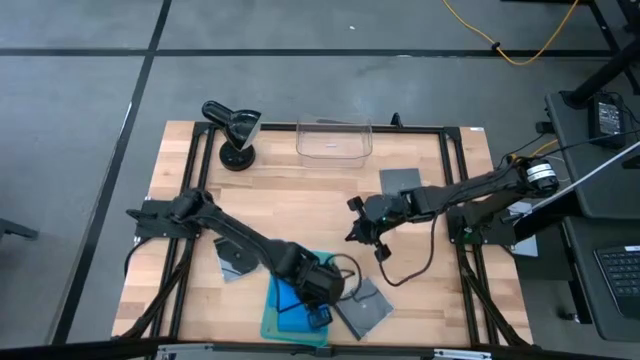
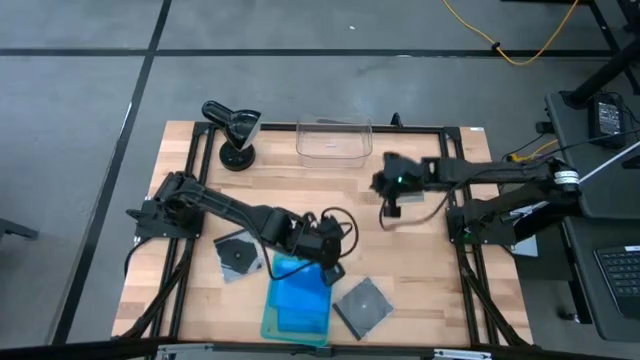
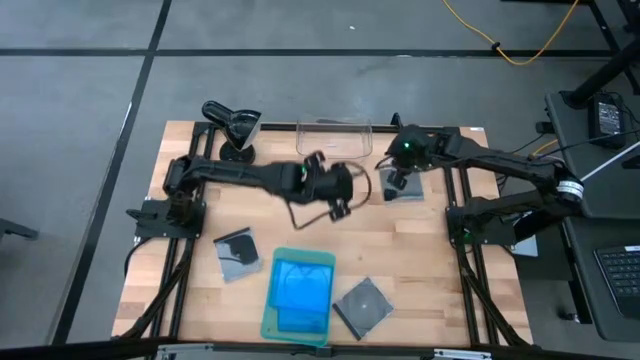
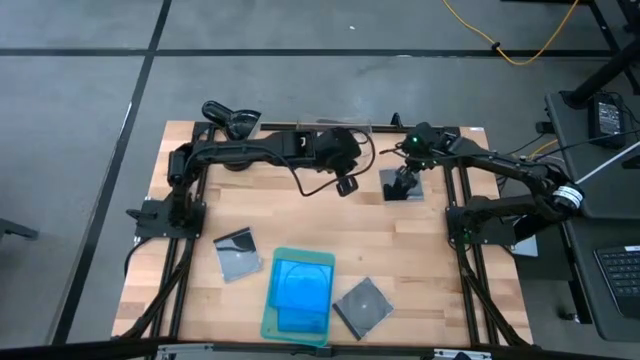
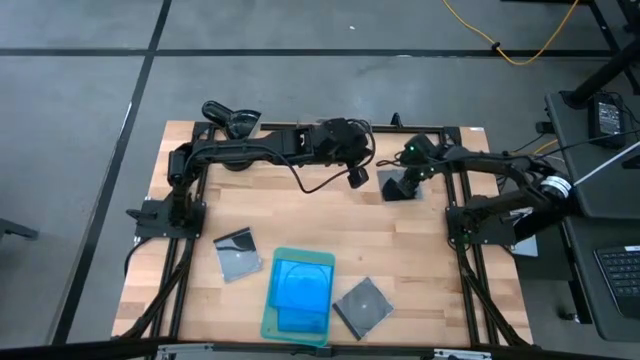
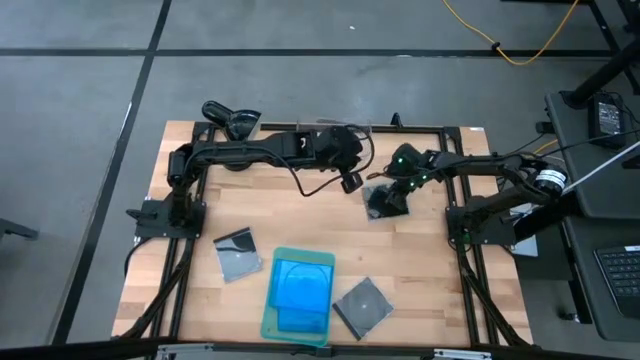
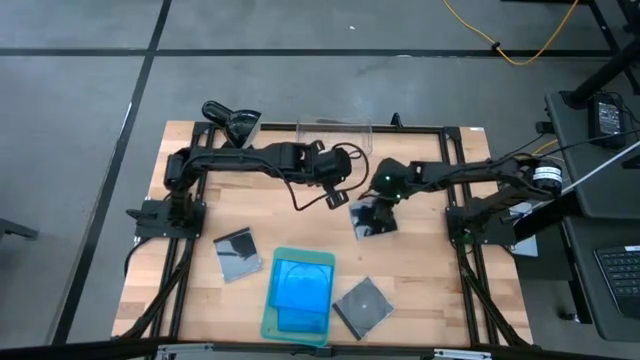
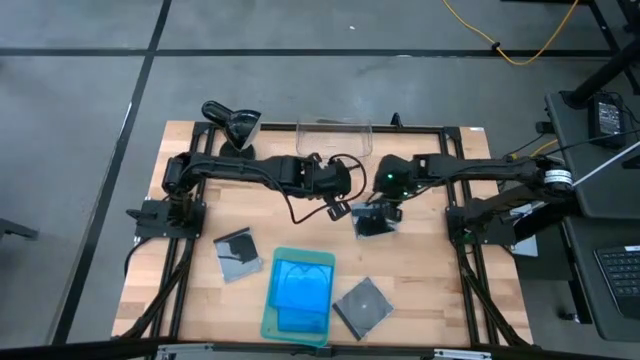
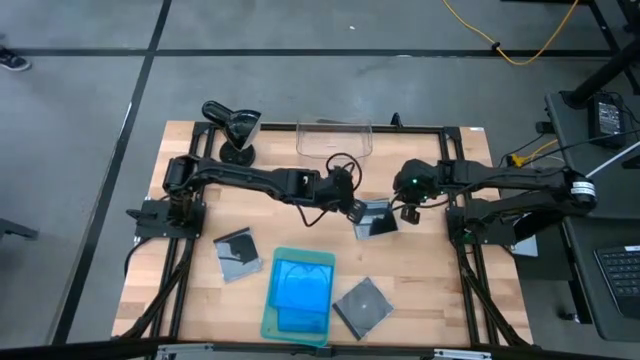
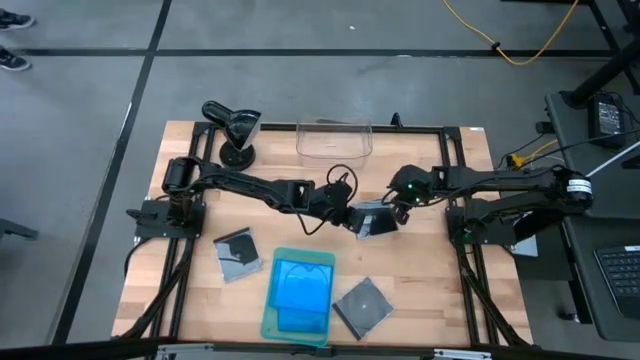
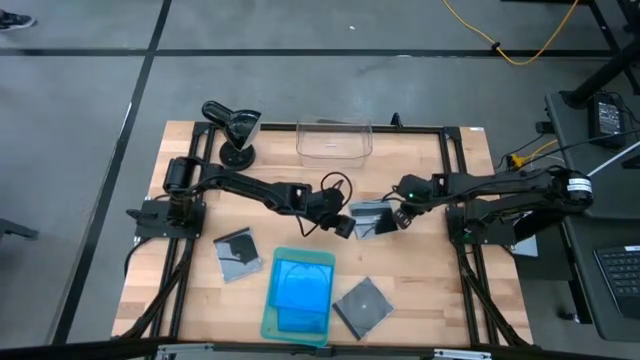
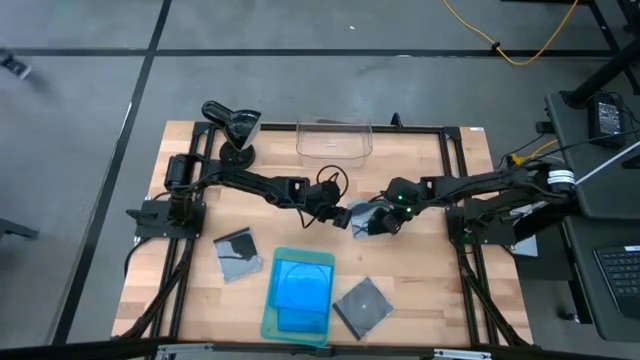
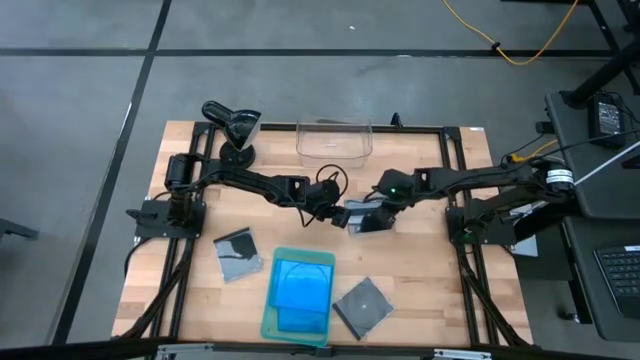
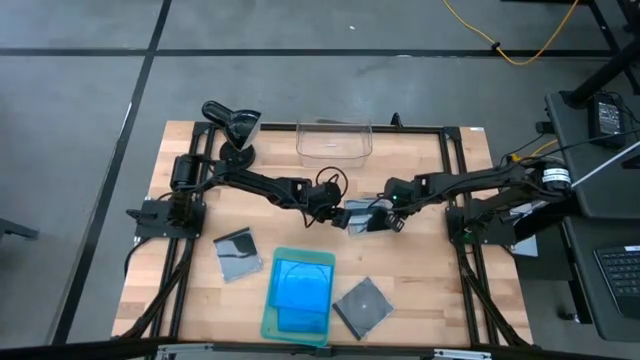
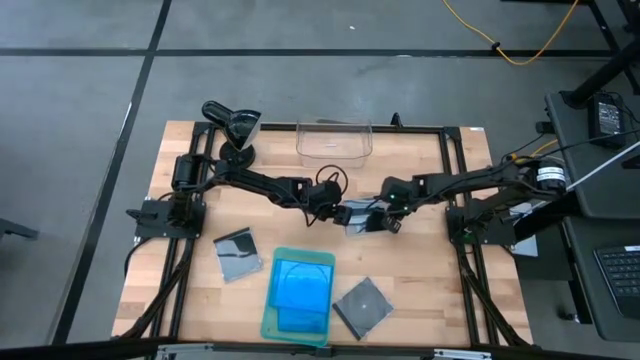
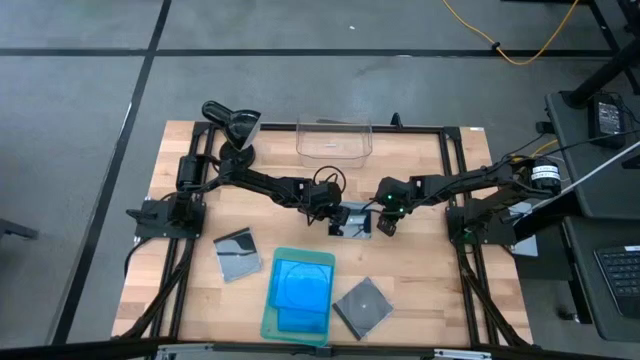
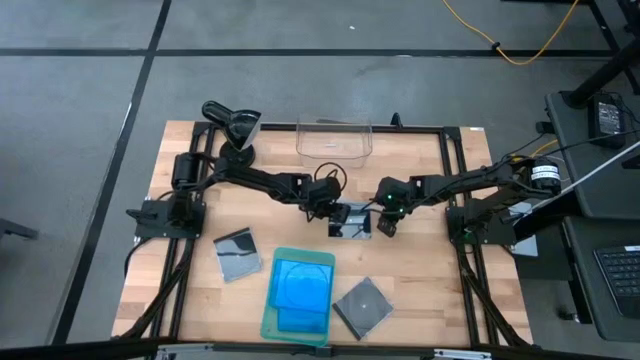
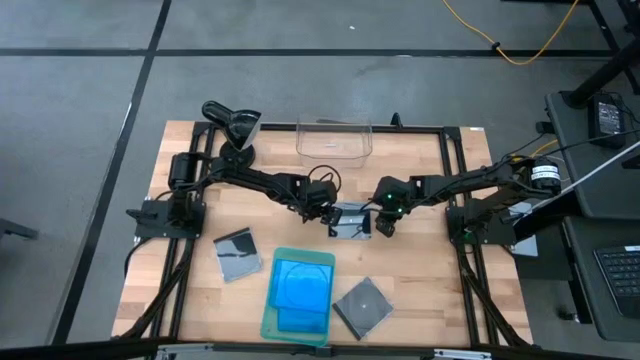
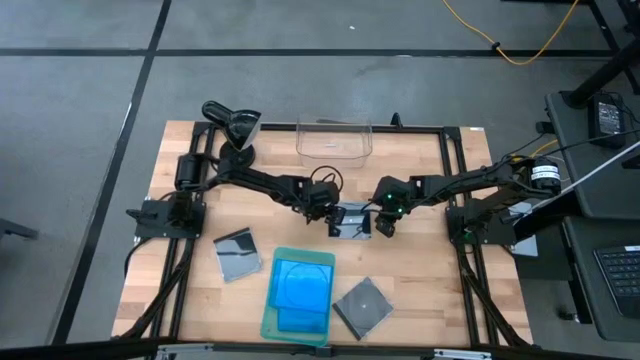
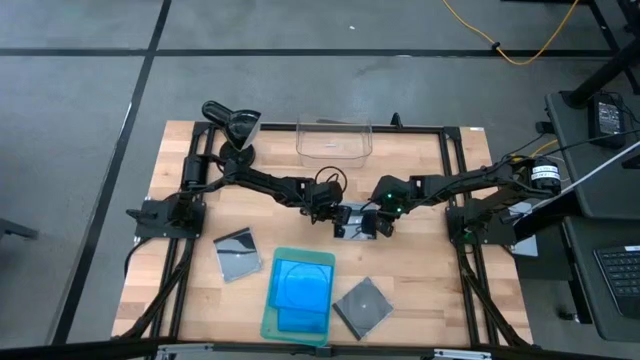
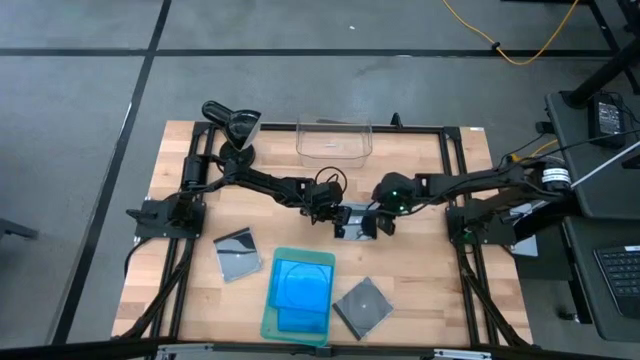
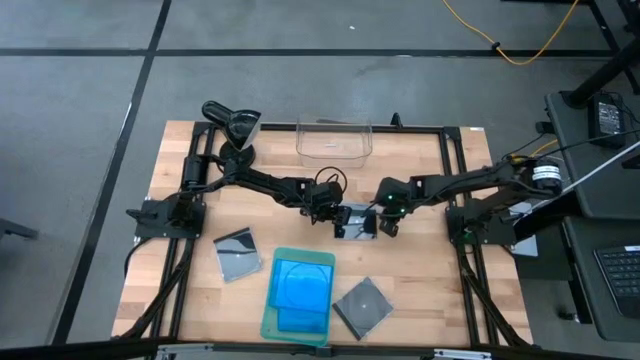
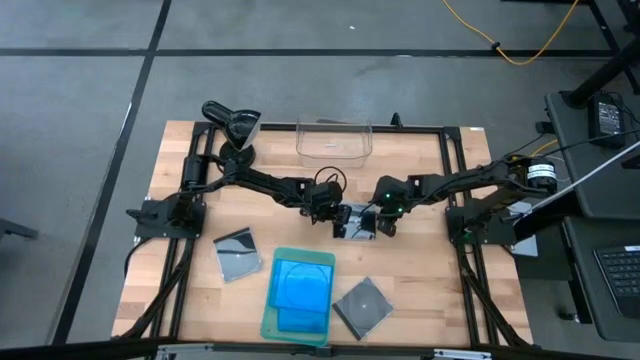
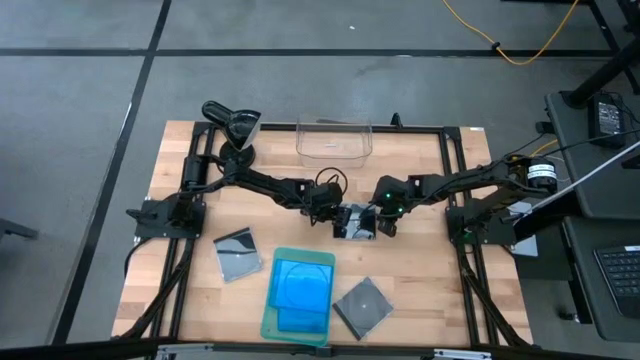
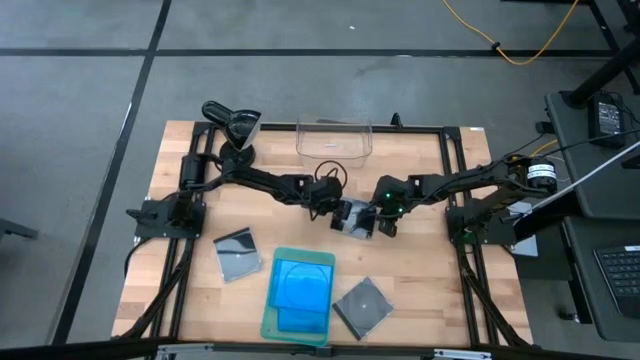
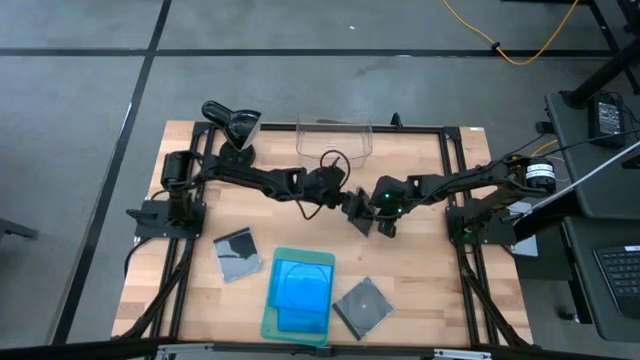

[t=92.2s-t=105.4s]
Task: Pick & place jewel cases by type
Put the top right black cd case into the transparent bin

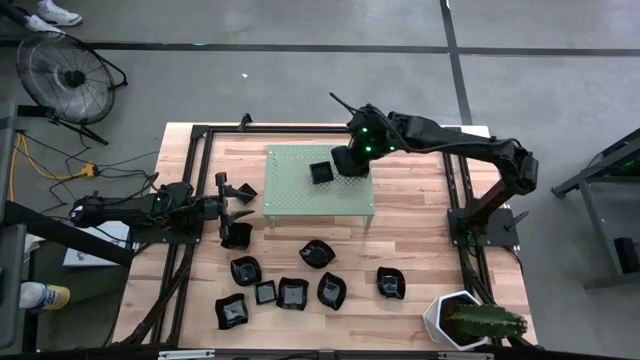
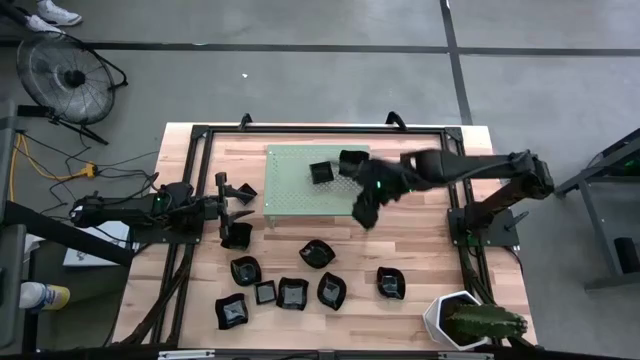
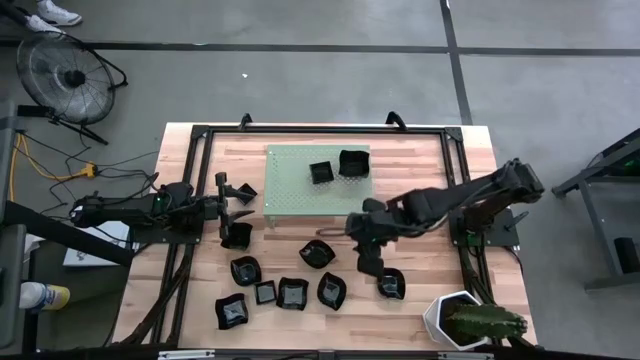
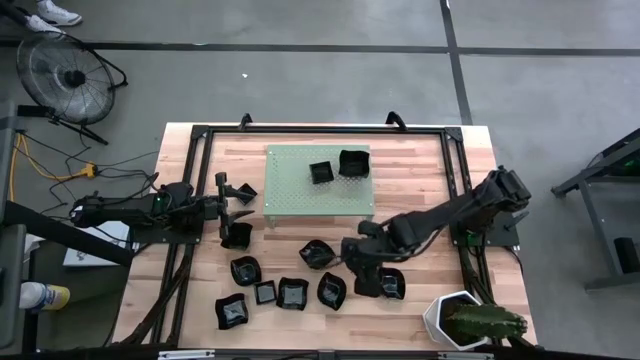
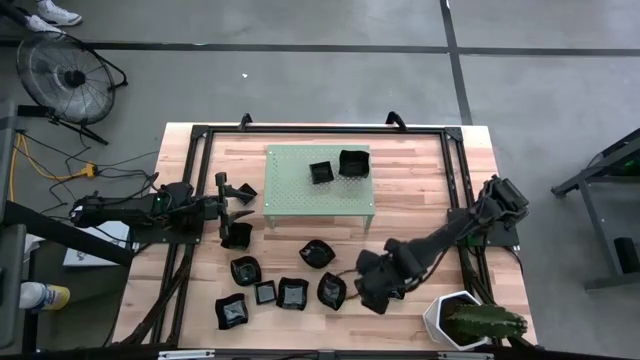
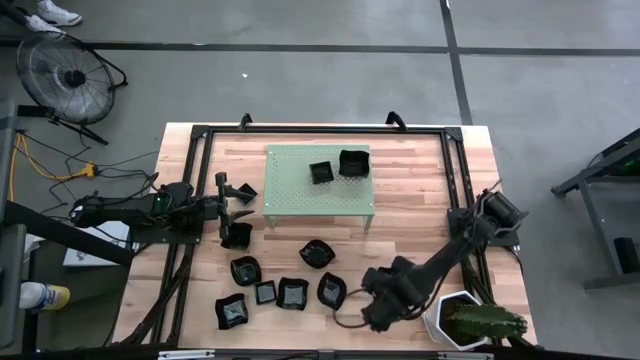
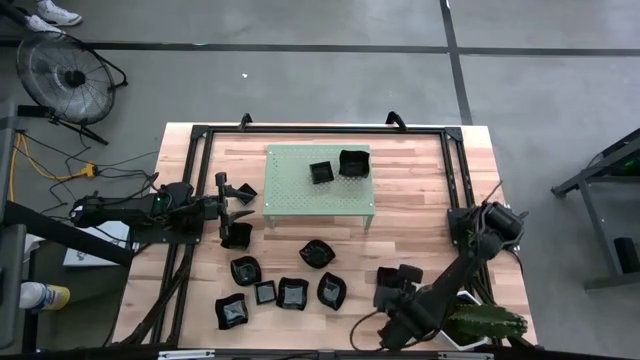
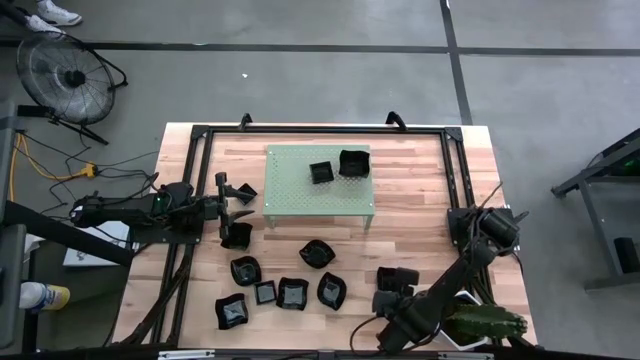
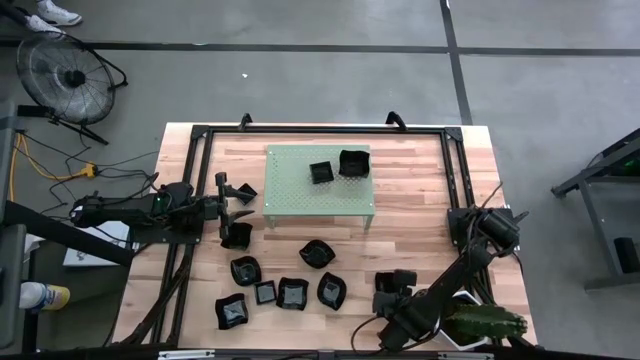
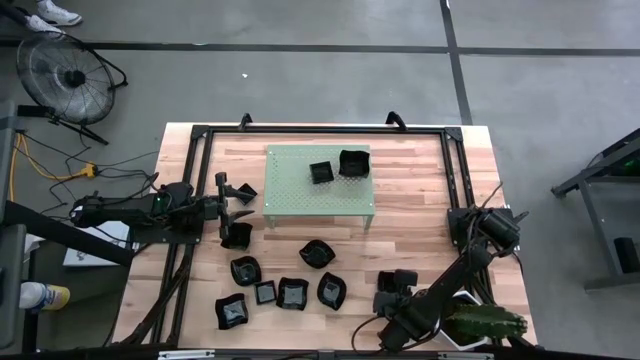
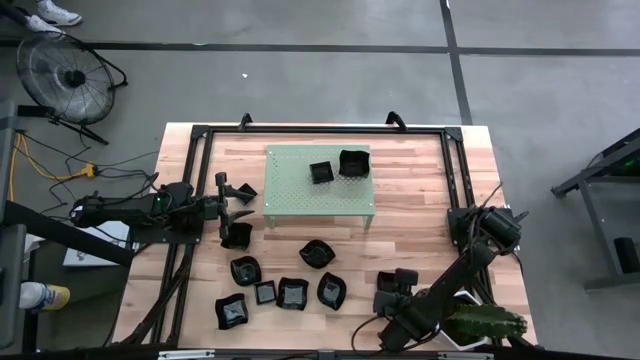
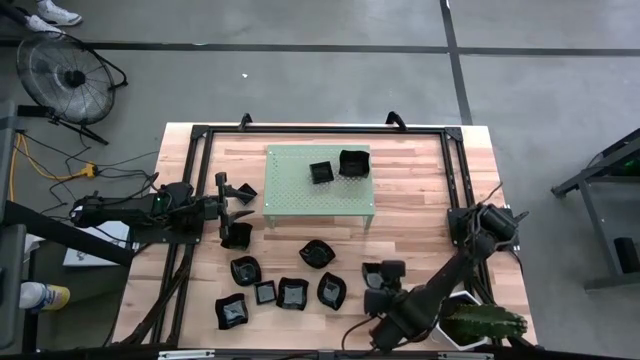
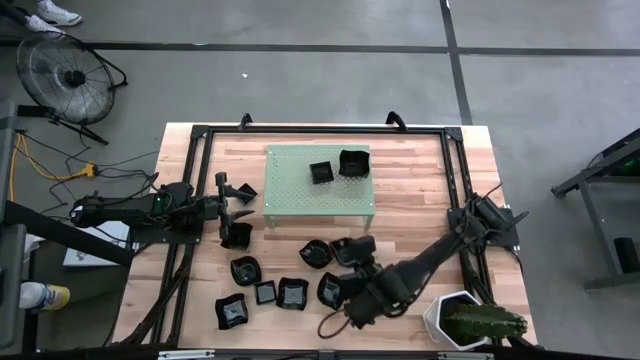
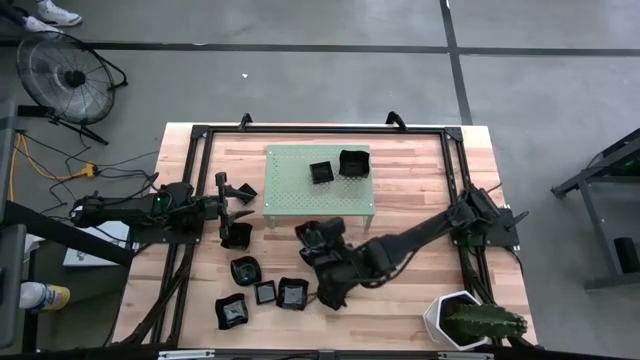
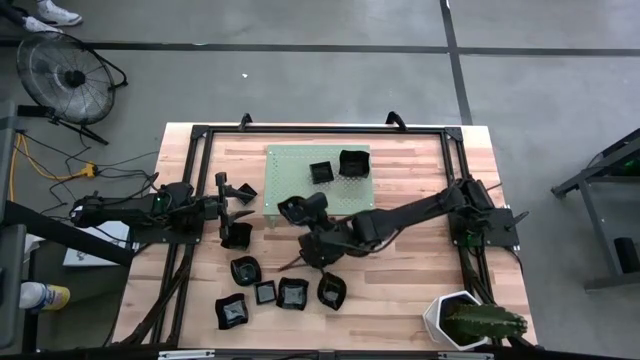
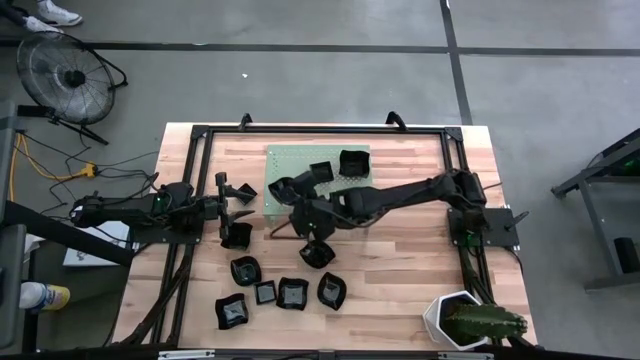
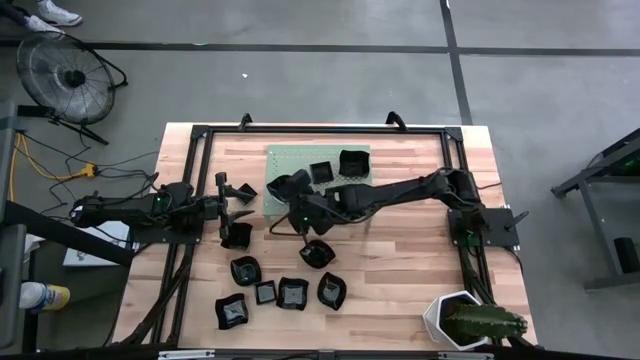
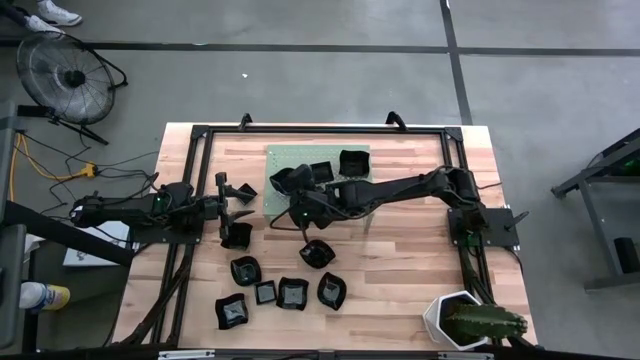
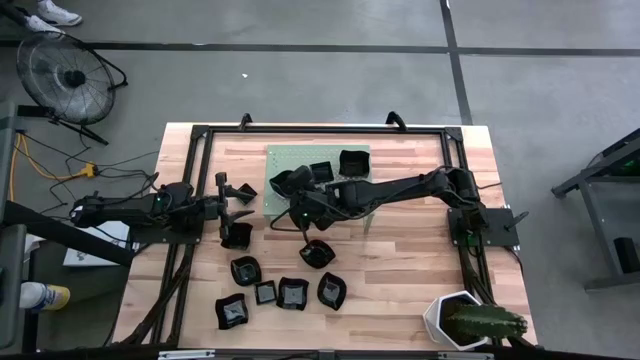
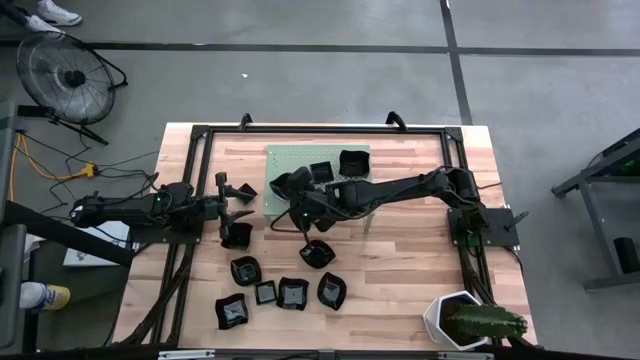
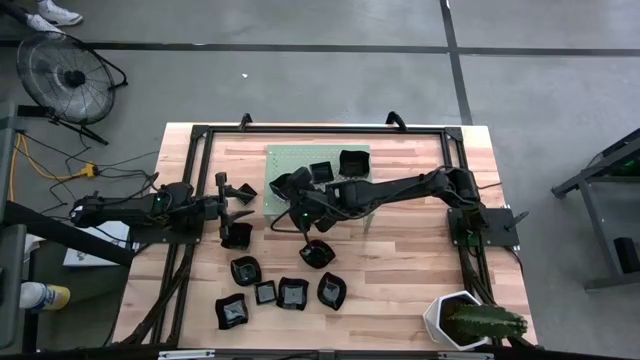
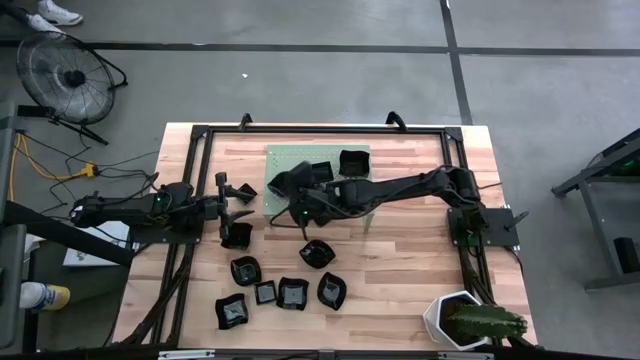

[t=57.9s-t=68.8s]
Task: Pick & Place Mini shaped plates
Put the leaf-shaped plate on the shelf
